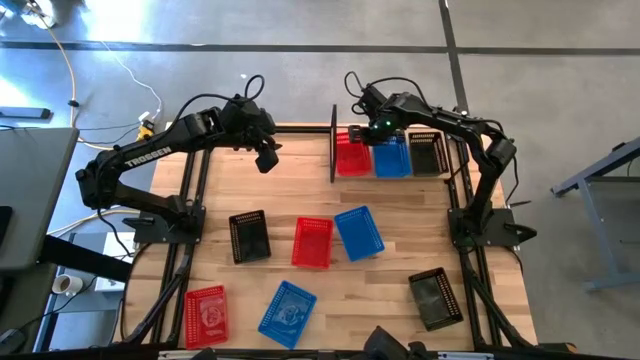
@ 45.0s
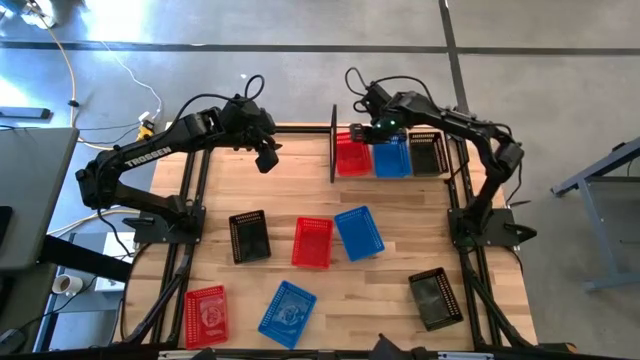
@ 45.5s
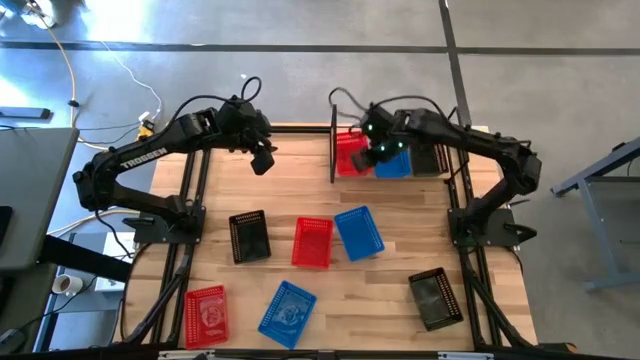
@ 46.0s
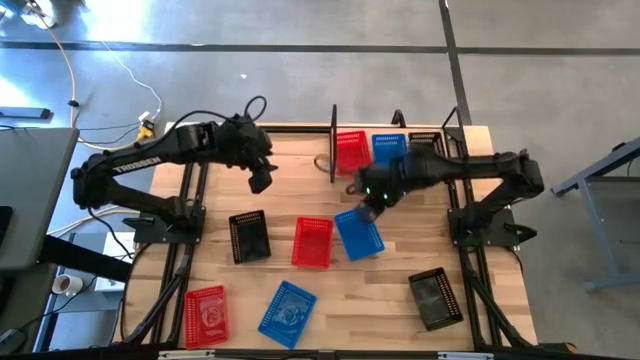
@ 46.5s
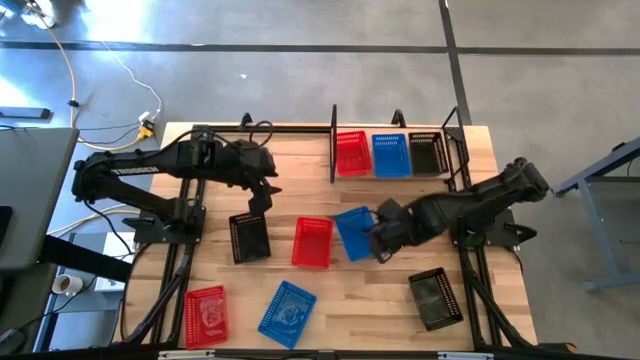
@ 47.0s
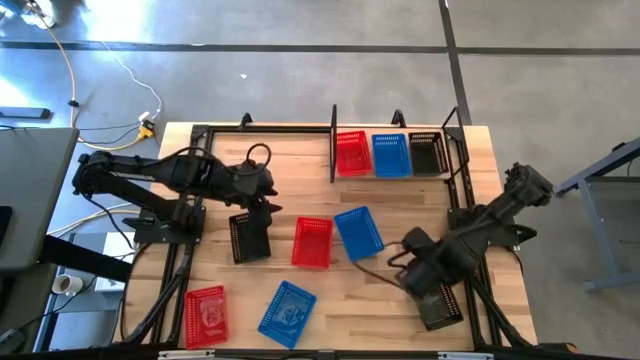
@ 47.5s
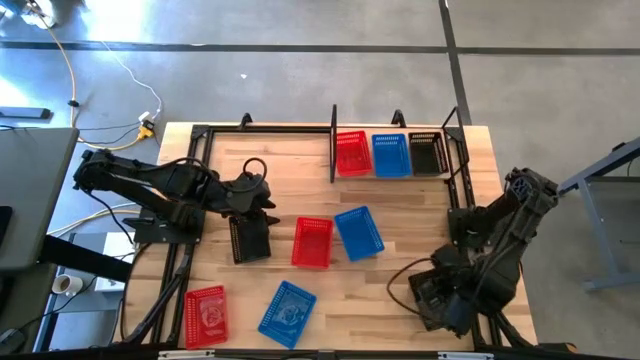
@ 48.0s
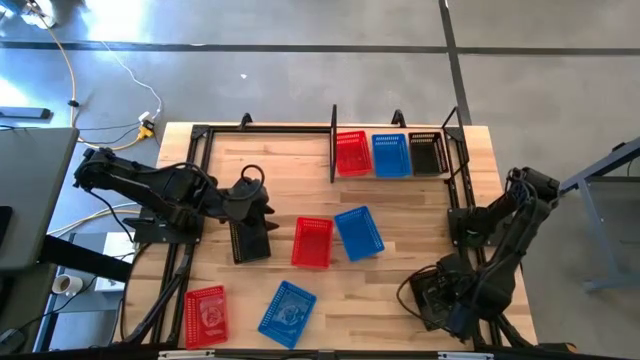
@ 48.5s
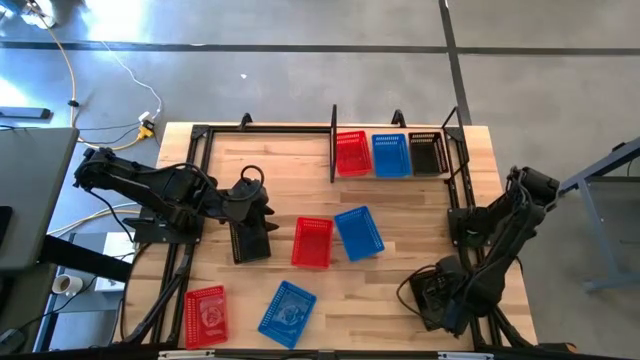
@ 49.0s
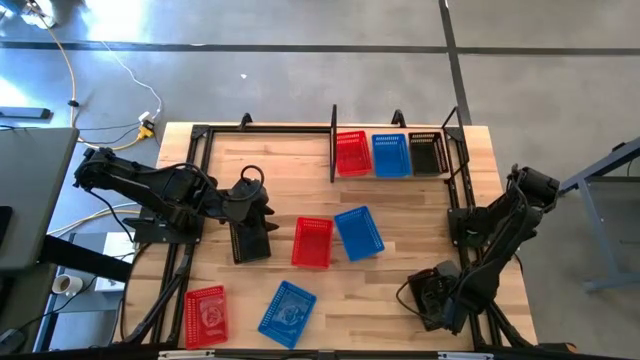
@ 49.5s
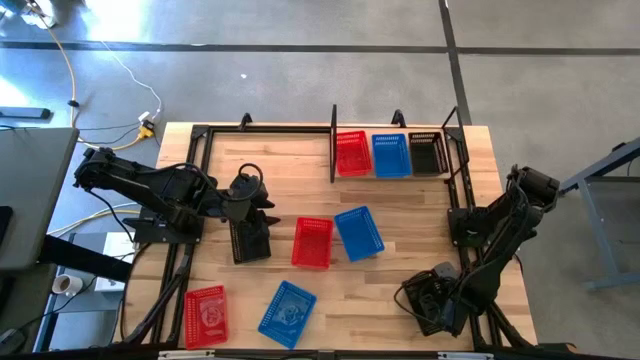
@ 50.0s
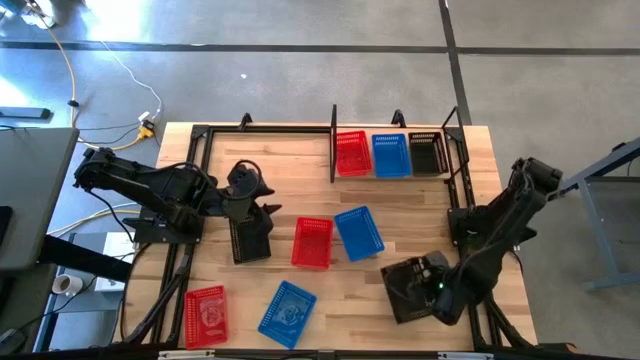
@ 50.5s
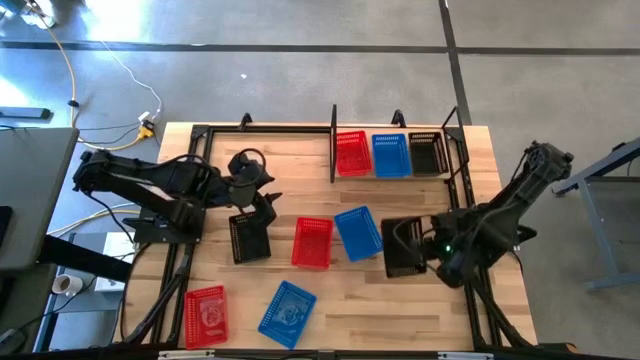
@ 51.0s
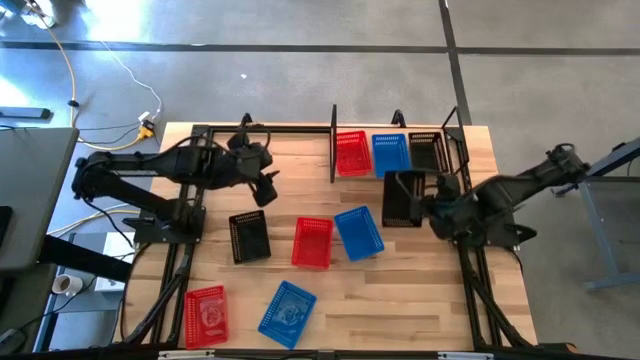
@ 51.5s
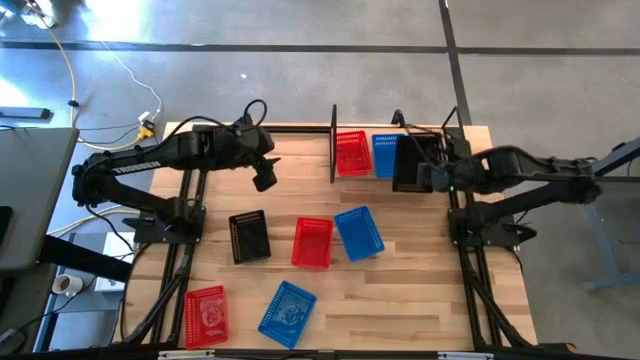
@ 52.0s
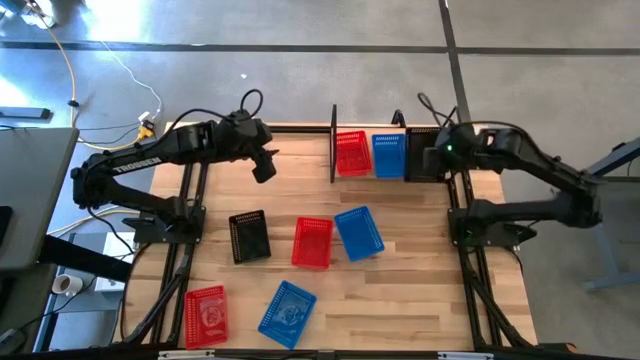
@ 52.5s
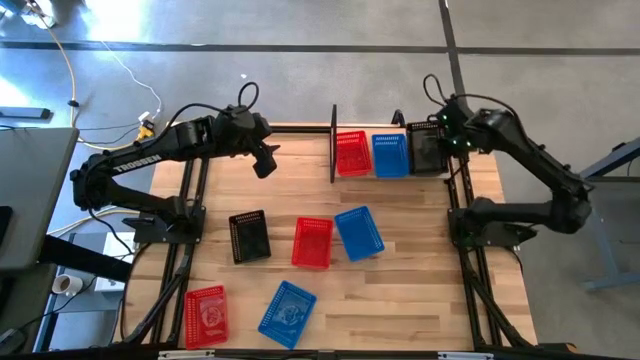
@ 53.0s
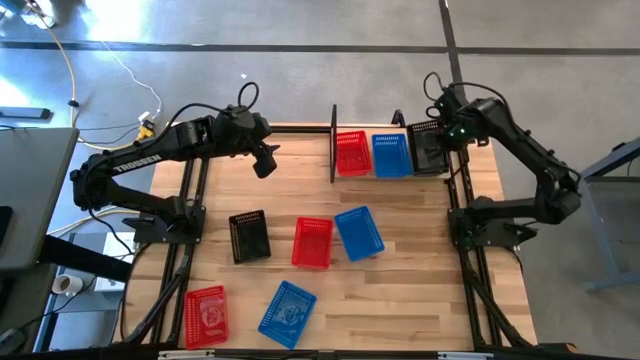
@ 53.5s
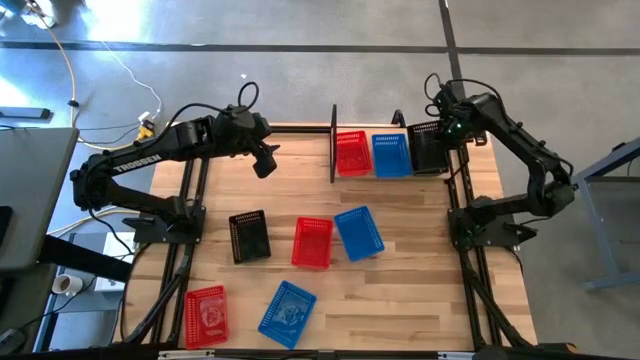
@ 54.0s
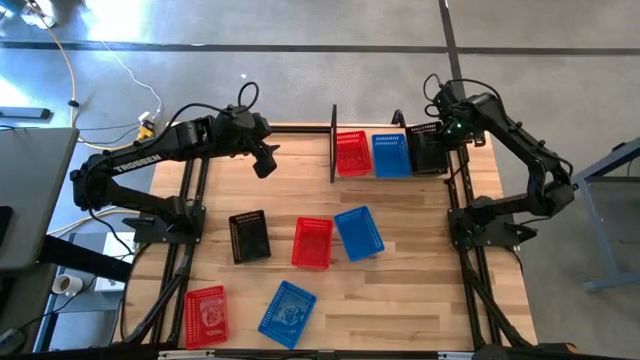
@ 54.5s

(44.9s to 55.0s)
Task: Stack baskets on shelf by color
Stack the bottom black basket on the black basket on the shelf

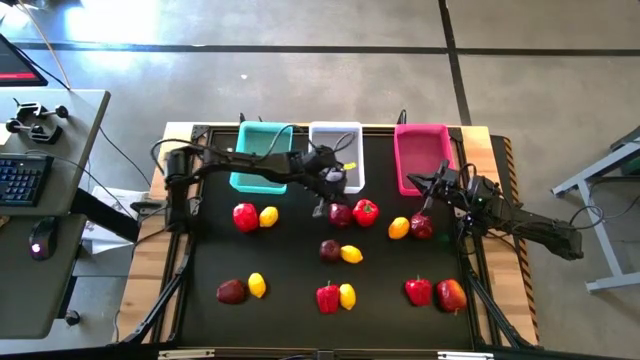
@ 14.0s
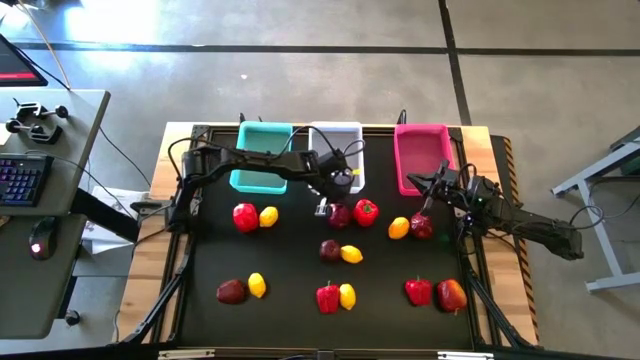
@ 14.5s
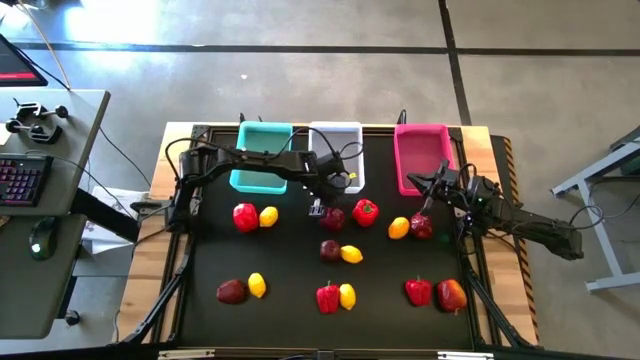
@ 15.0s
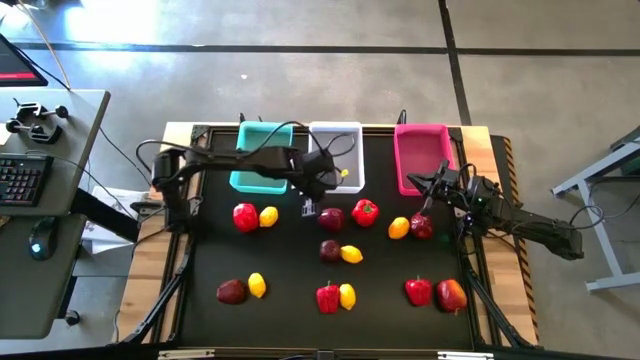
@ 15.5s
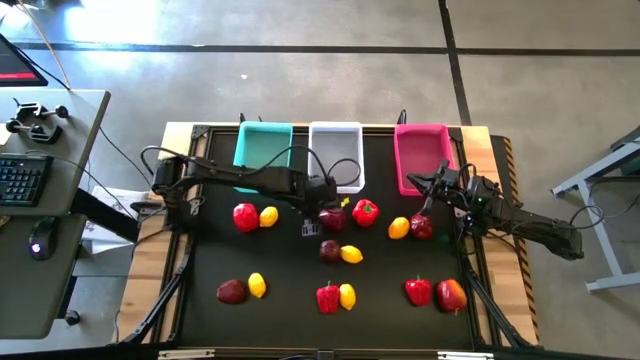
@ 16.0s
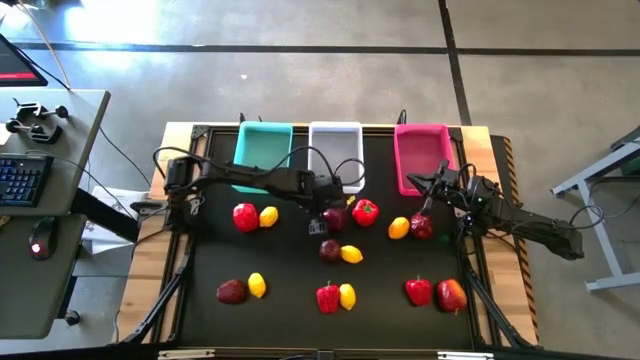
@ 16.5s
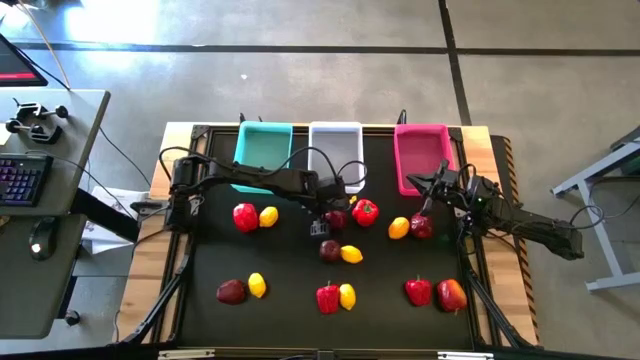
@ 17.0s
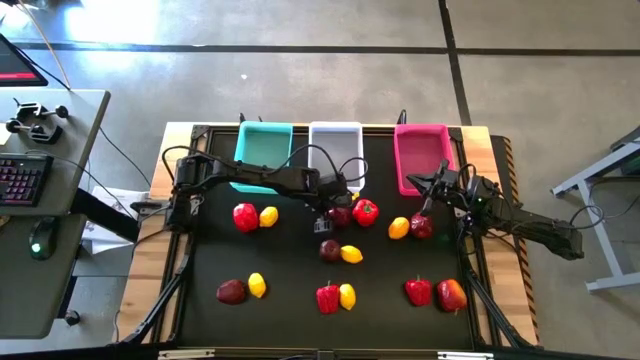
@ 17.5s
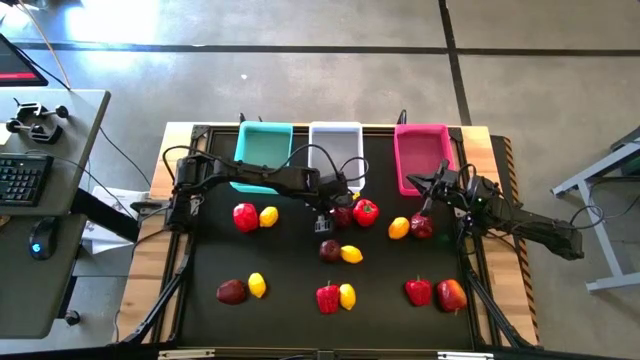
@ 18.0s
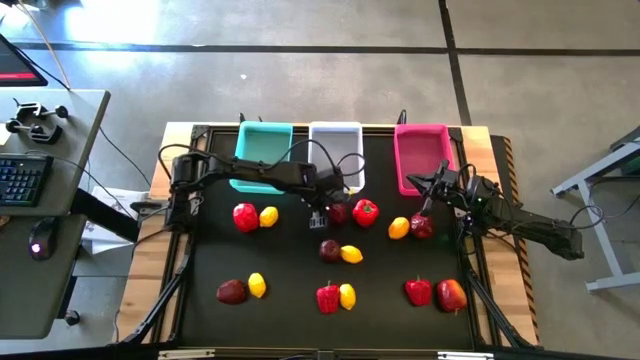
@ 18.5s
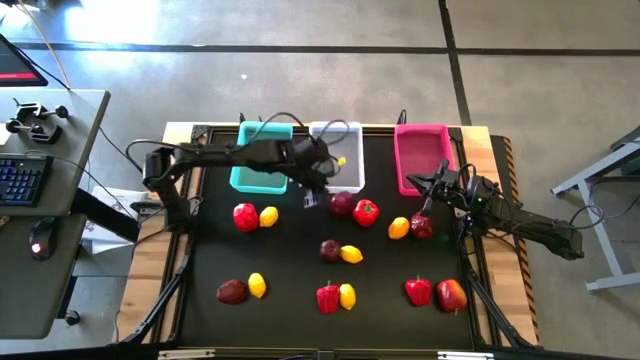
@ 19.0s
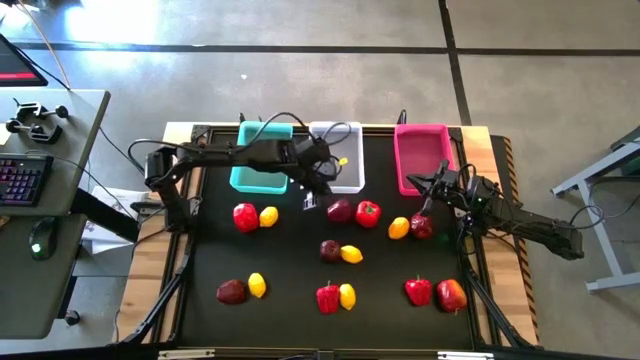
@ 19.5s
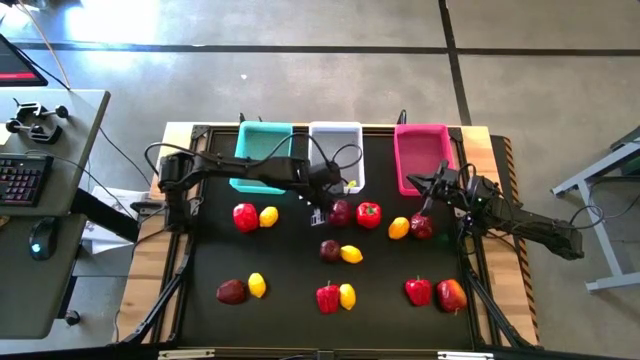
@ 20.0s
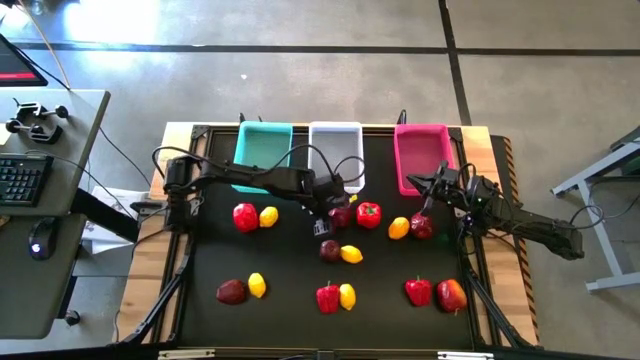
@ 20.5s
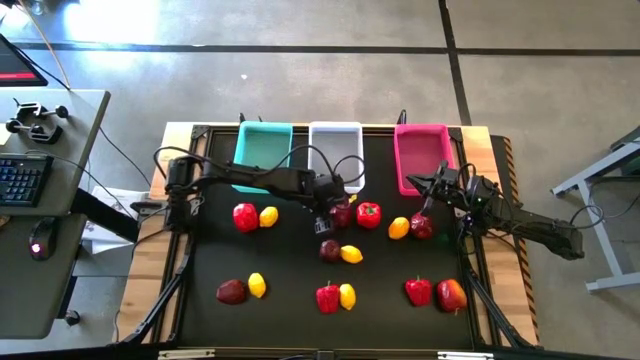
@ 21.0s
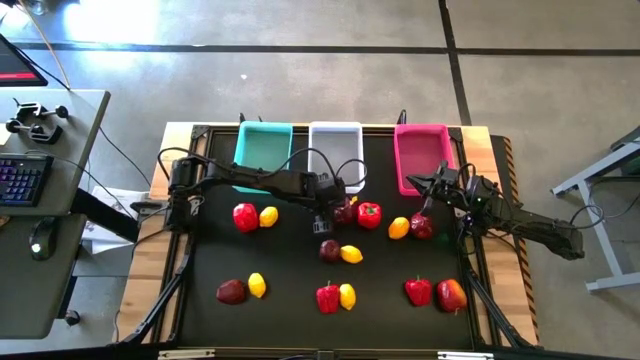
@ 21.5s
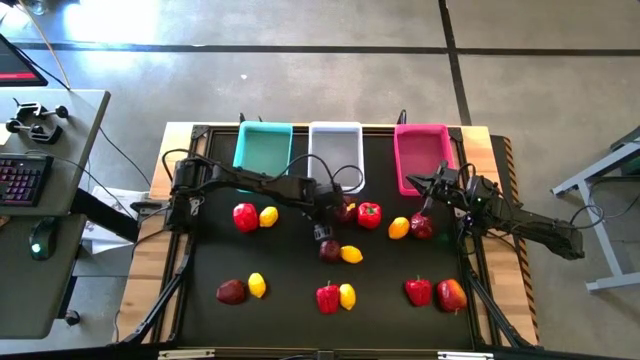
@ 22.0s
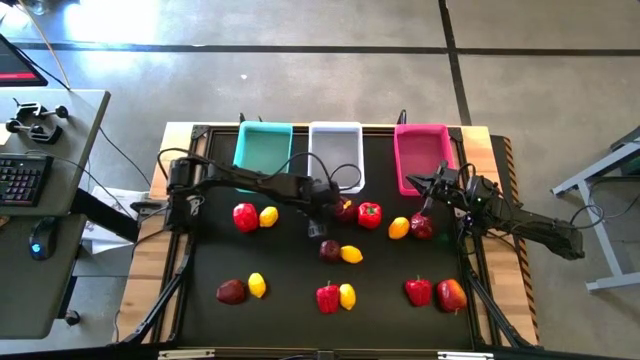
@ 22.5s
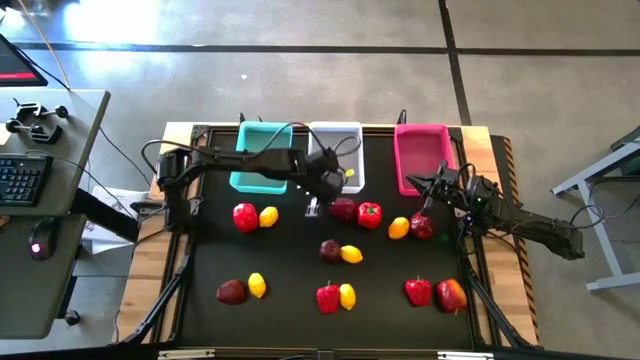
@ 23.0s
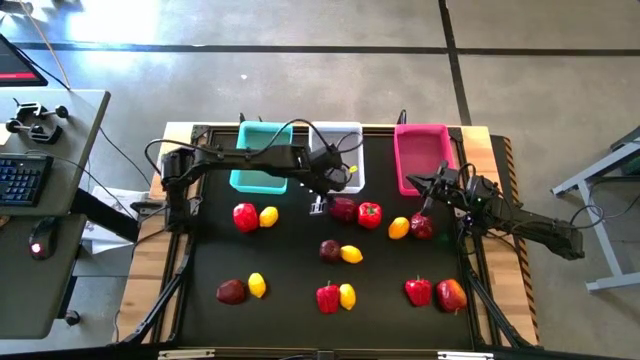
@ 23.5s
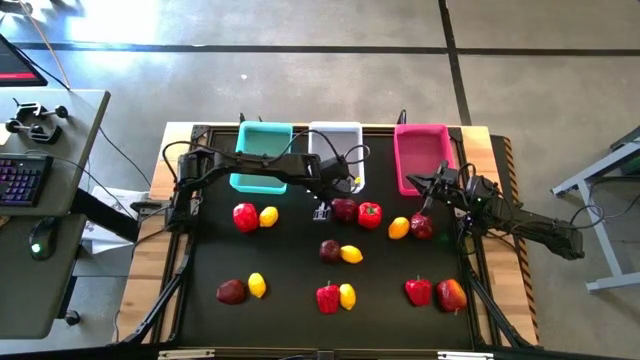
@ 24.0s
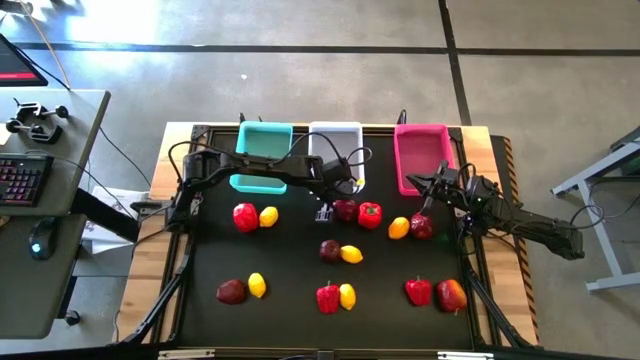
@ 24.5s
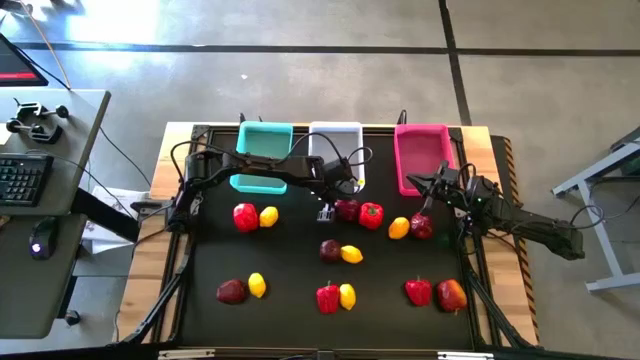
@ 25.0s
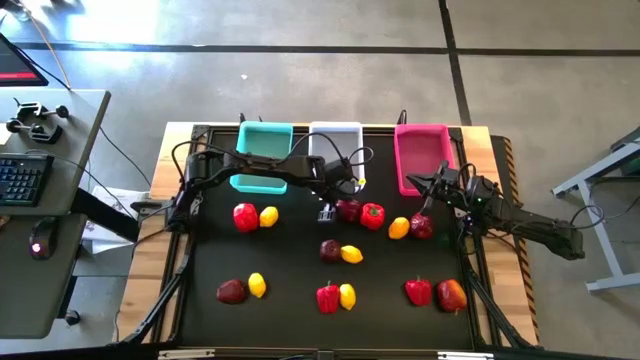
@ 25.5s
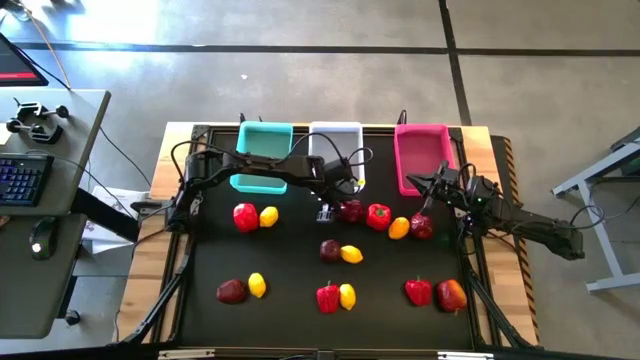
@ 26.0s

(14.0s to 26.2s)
Task: Sort produce into baskets
Put the apple into the white bin
